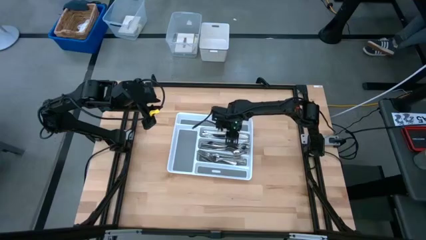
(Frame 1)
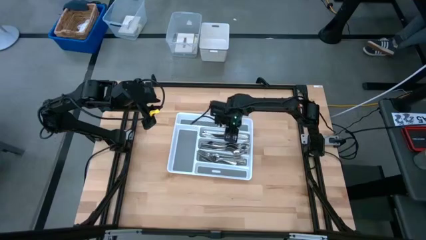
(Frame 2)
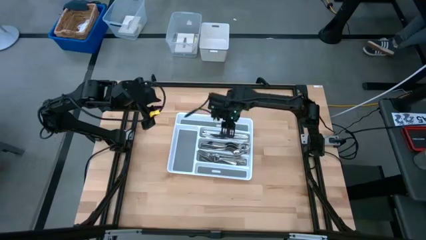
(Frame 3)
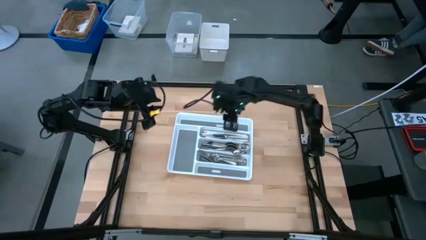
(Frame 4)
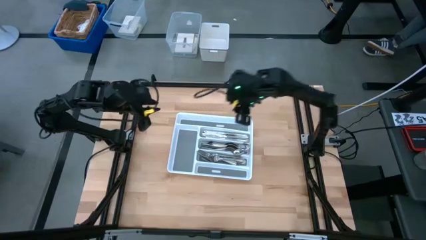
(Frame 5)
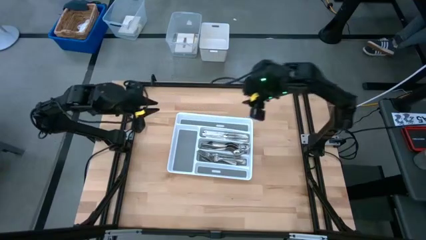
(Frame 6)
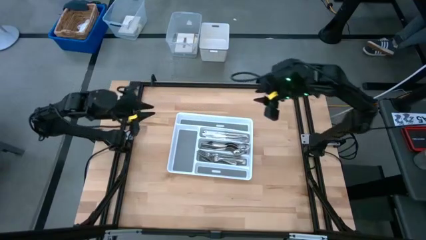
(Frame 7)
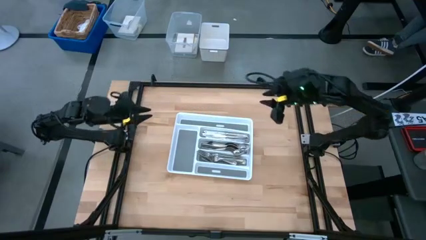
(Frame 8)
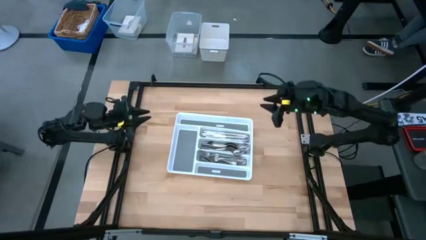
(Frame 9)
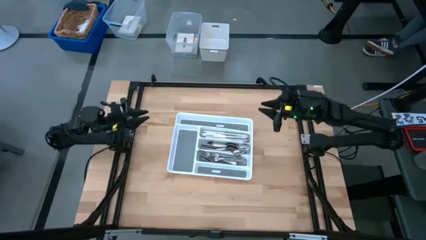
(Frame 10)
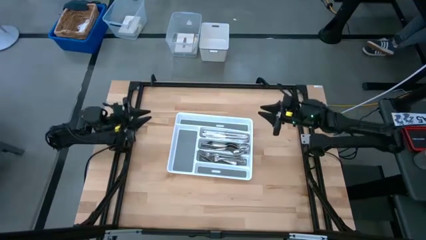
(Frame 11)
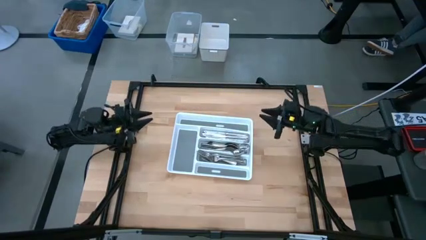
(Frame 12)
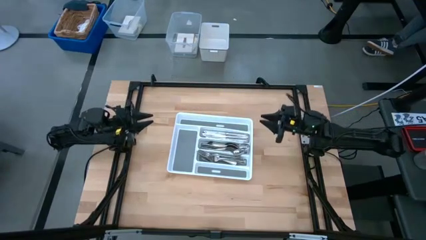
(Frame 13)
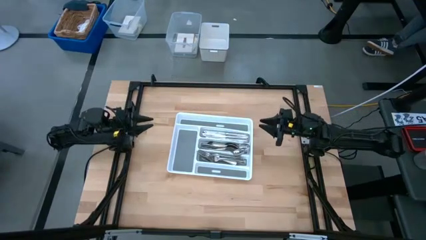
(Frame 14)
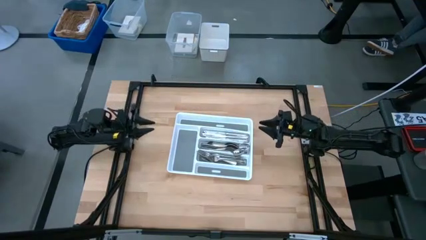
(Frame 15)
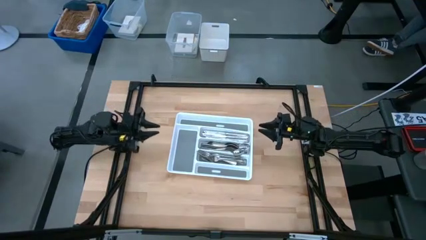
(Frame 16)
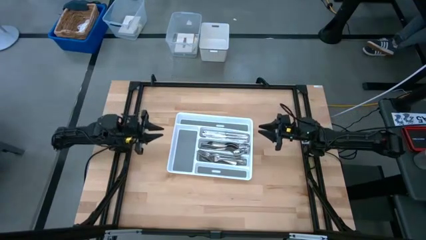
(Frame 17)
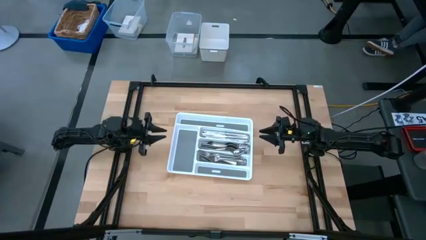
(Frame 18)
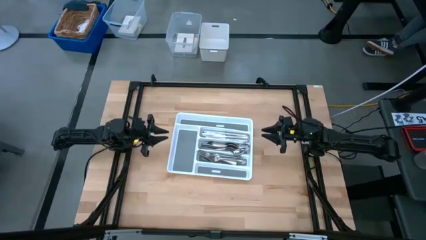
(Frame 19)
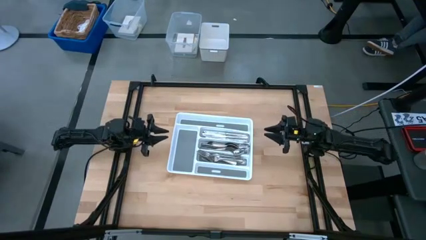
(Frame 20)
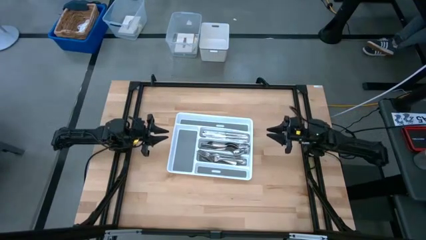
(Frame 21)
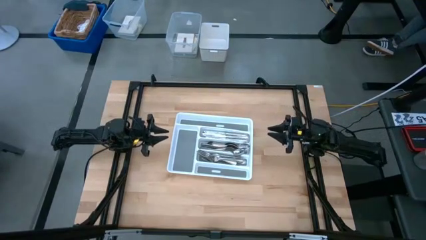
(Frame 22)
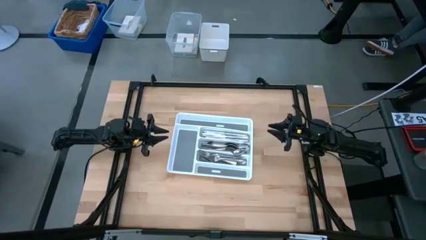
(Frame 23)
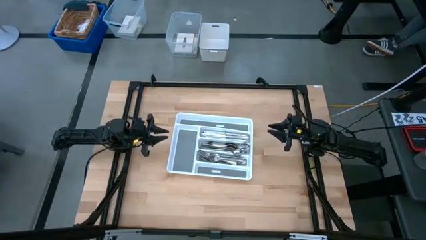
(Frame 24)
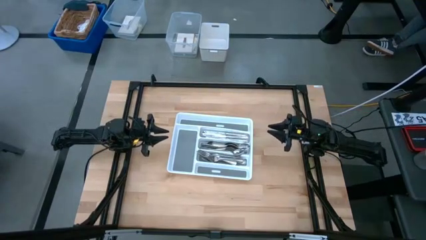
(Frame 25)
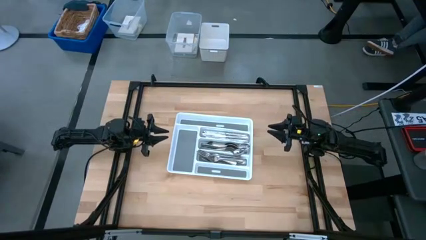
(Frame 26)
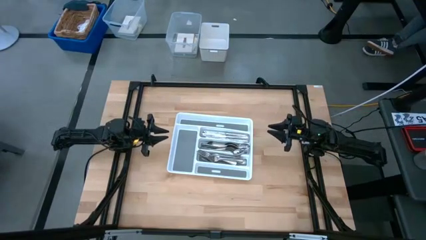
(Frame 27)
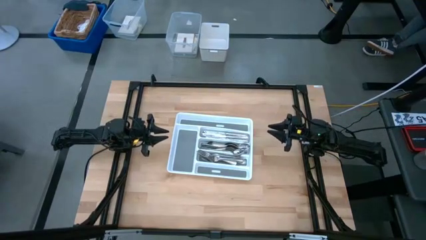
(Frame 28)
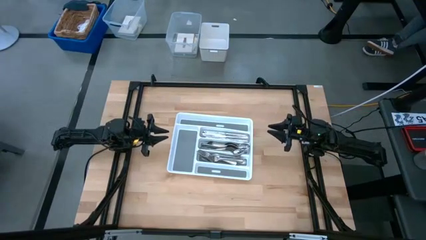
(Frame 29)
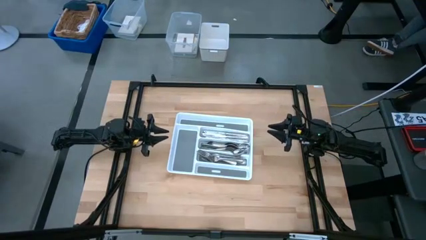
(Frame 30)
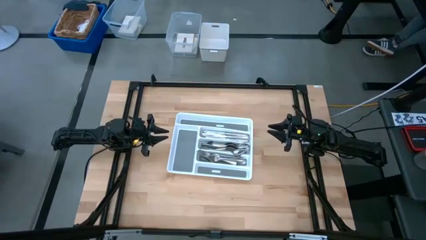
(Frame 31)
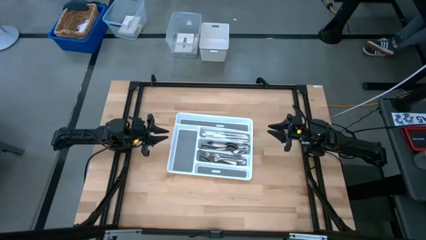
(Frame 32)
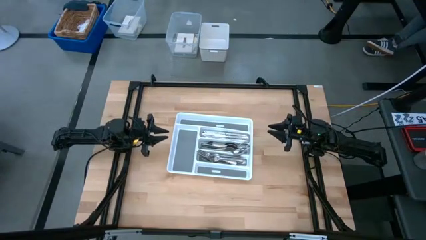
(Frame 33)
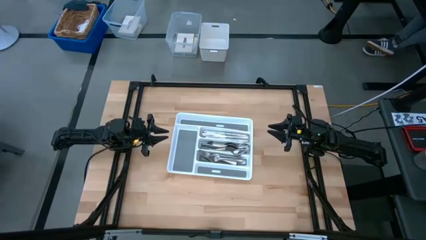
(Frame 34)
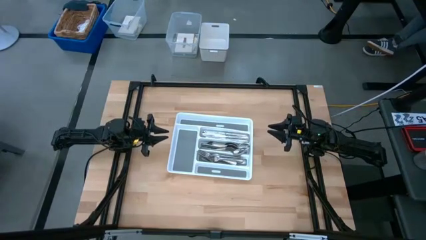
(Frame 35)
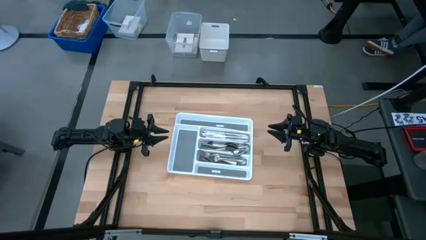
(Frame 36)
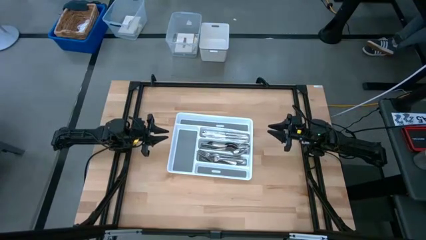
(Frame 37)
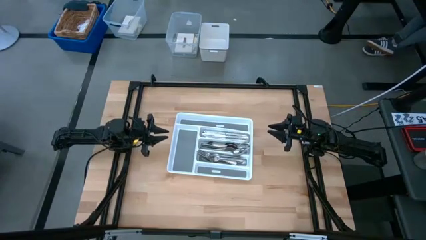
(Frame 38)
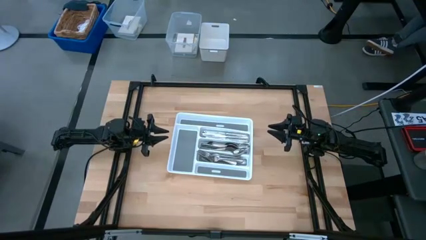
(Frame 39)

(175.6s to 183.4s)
Task: Sort silverware
Return to Home Position

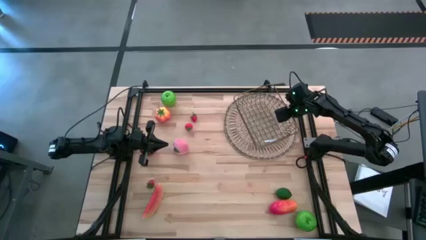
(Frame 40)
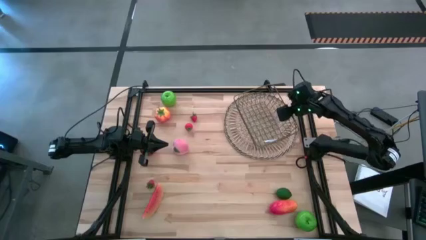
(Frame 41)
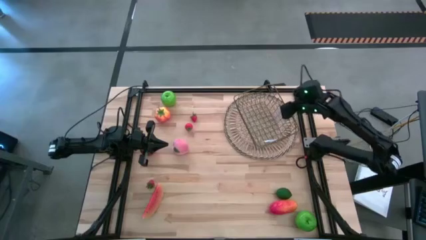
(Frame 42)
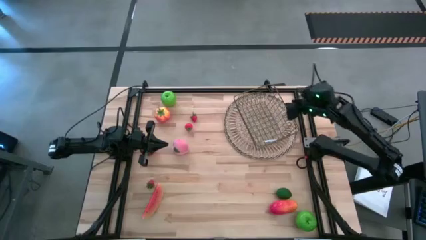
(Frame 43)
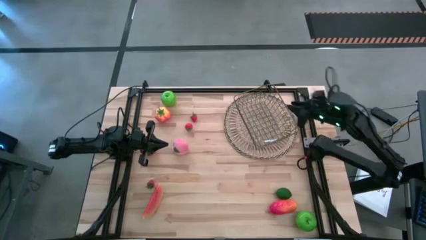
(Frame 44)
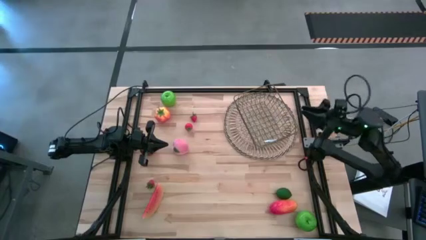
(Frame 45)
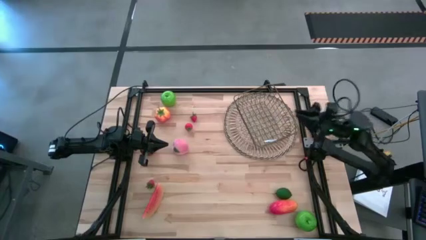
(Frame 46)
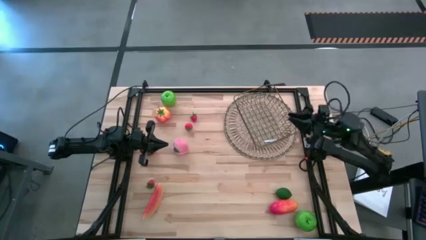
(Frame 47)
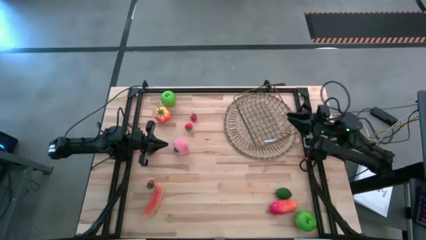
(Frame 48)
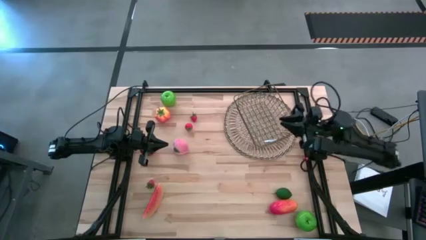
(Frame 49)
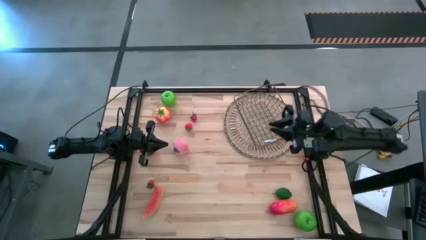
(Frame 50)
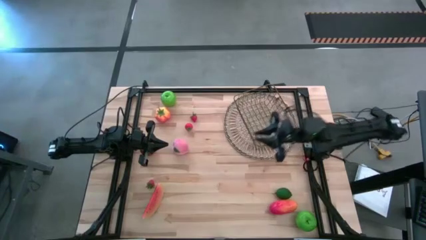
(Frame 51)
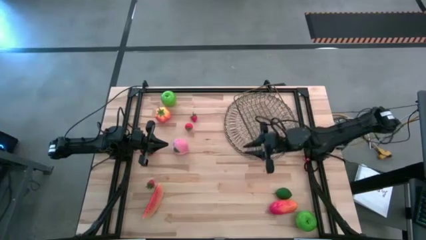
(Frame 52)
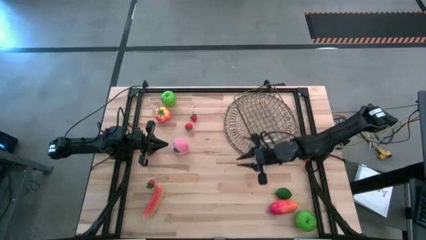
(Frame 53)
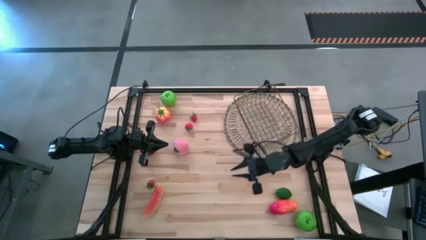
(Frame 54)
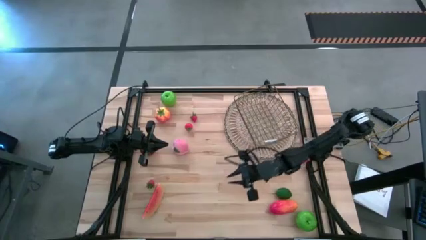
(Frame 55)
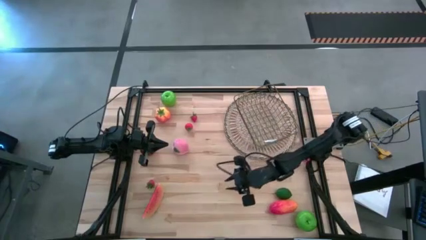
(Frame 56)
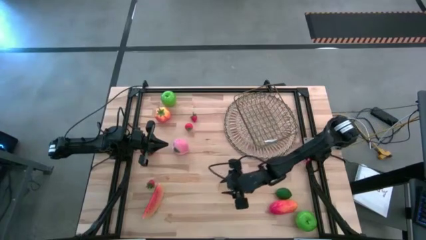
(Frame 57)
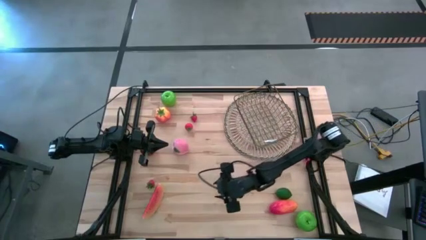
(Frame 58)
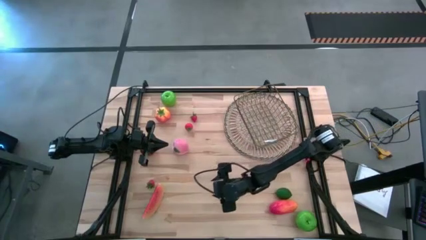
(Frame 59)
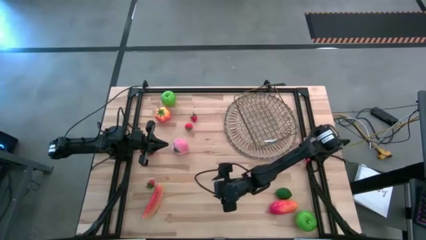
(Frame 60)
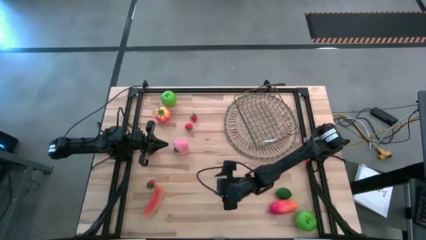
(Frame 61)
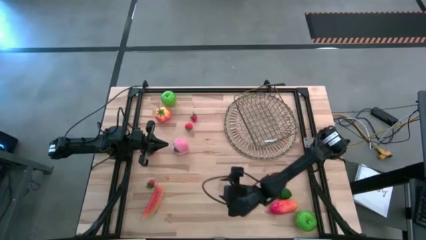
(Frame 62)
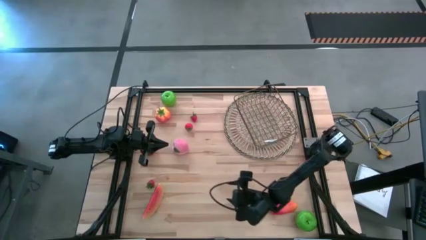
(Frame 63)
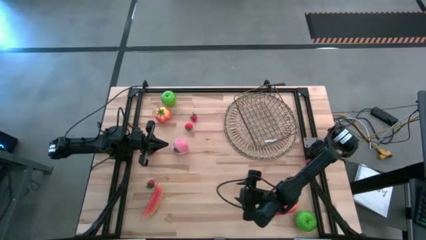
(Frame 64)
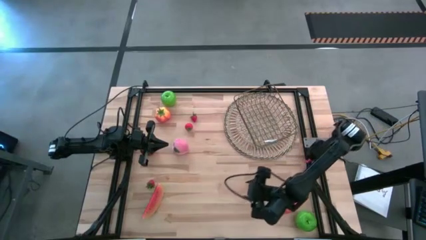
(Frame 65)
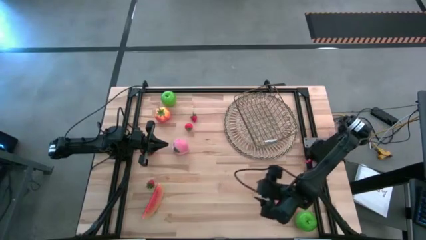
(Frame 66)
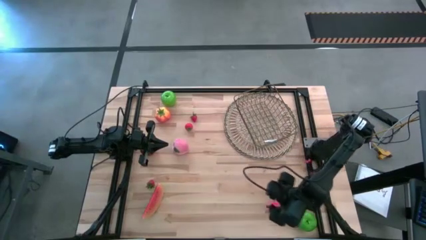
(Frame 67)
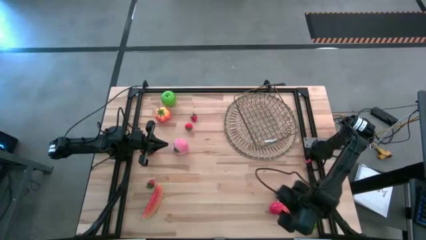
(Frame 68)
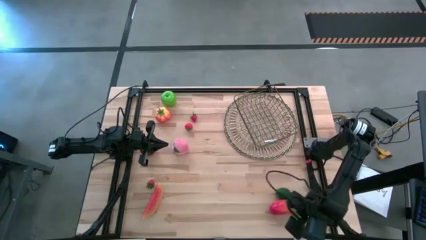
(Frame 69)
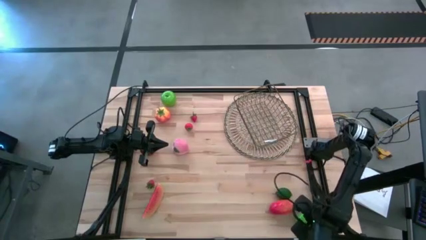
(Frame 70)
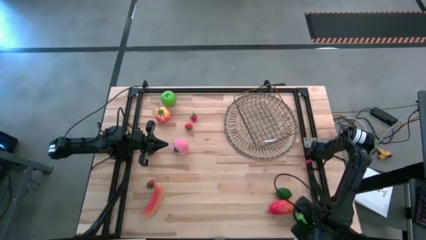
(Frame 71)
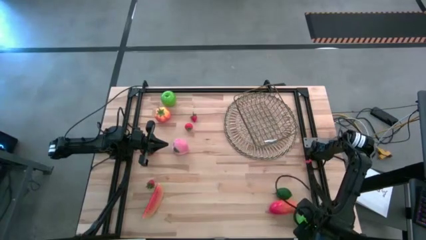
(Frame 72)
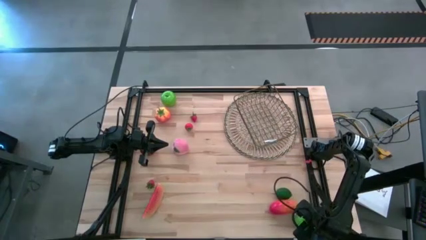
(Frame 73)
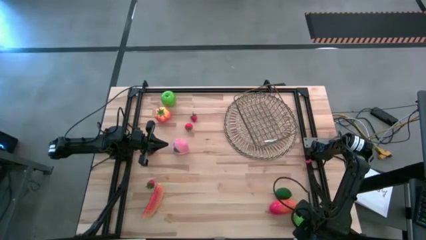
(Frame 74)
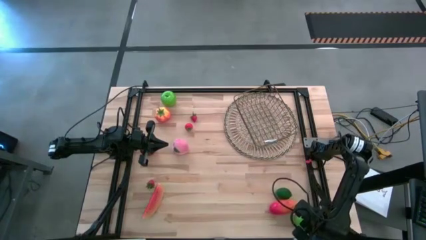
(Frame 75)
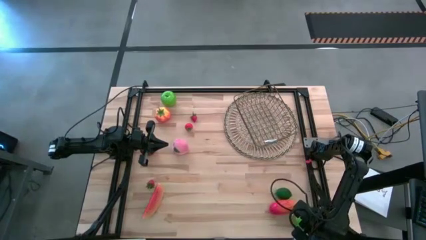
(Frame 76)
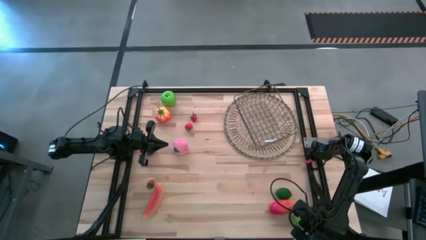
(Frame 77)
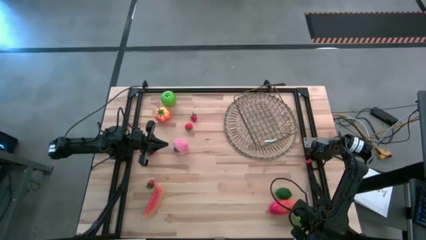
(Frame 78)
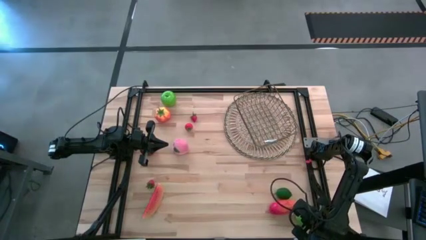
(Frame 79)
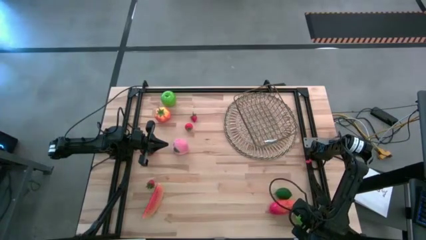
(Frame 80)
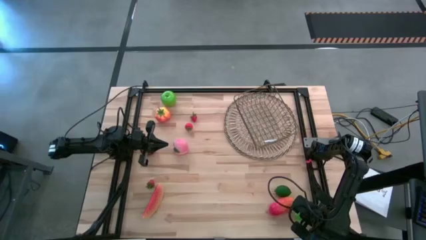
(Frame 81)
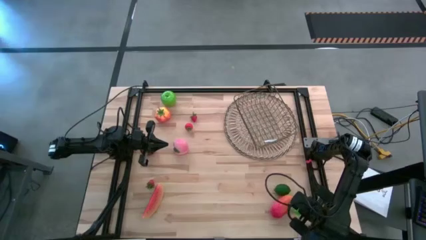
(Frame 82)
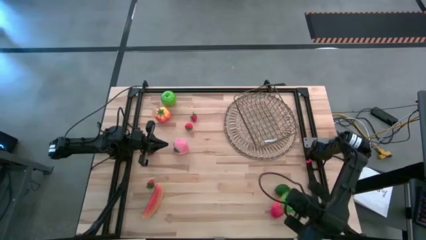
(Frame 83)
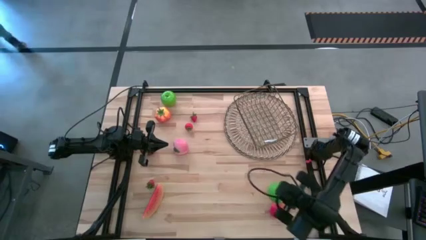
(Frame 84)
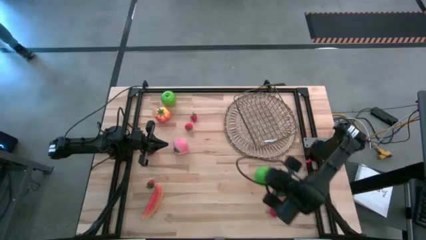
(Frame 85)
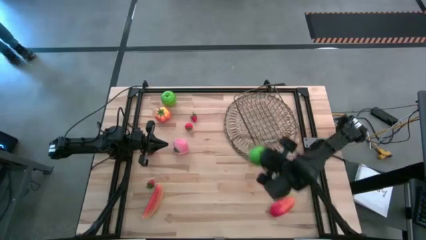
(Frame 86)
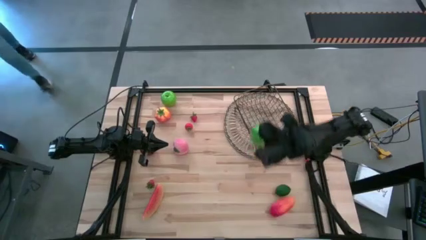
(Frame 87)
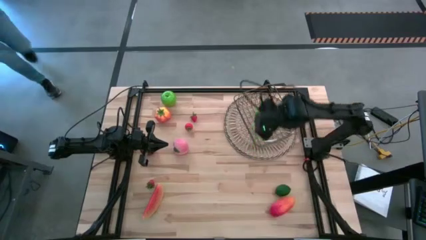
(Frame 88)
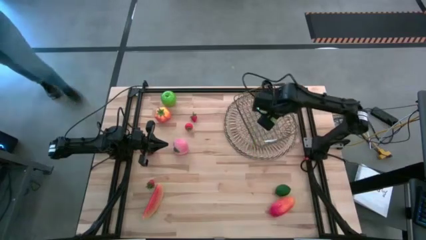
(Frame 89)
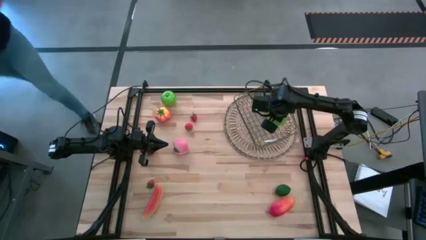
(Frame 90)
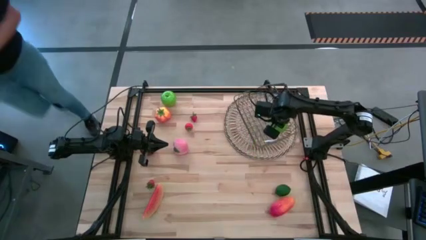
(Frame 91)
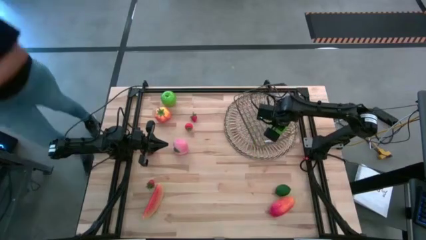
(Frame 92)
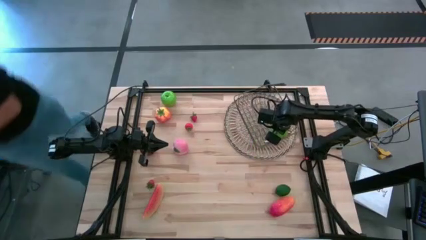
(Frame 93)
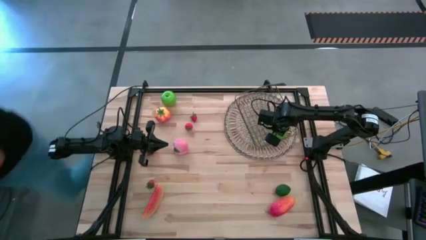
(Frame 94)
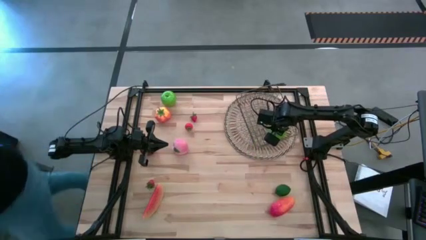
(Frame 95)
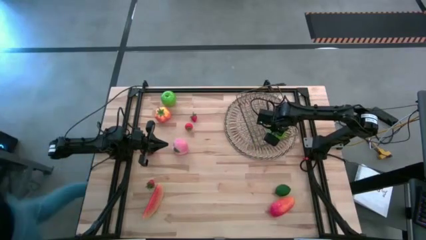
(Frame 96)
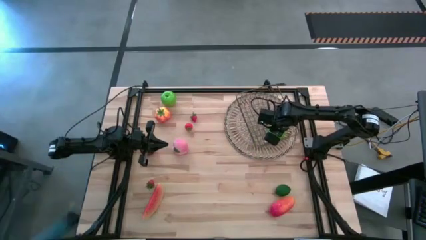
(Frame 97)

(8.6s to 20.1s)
Task: Build produce basket
Put the bottom green apple into the gold wire basket
